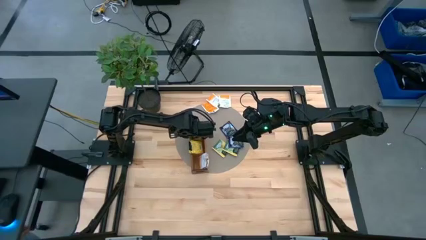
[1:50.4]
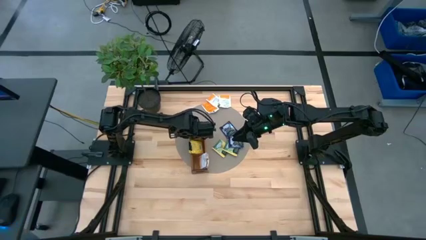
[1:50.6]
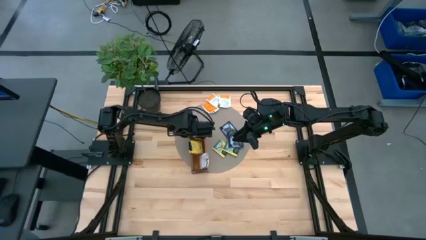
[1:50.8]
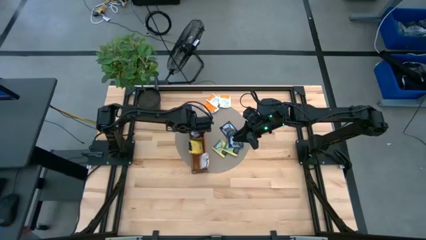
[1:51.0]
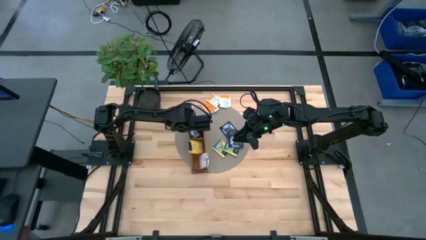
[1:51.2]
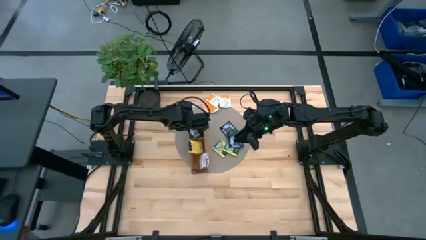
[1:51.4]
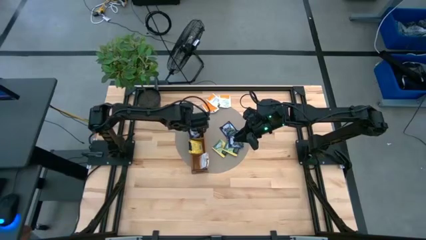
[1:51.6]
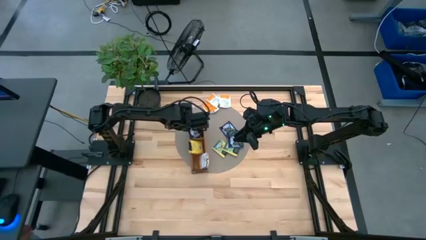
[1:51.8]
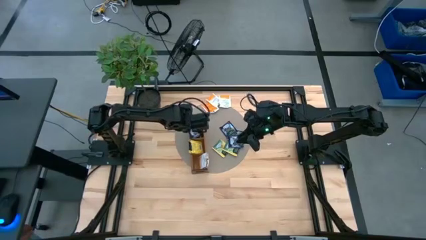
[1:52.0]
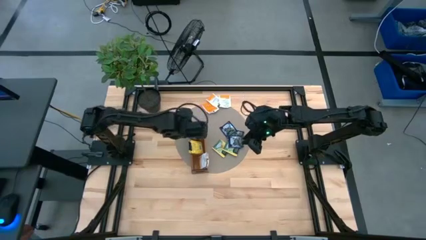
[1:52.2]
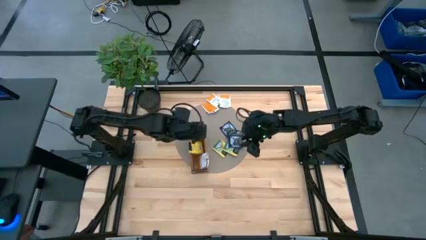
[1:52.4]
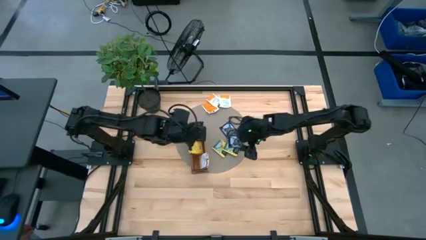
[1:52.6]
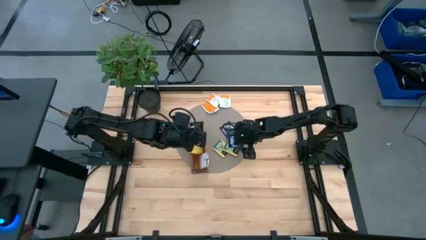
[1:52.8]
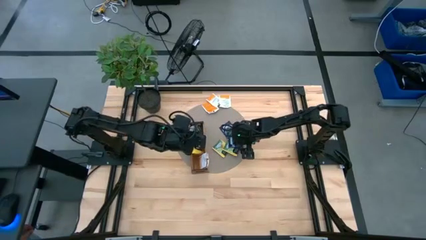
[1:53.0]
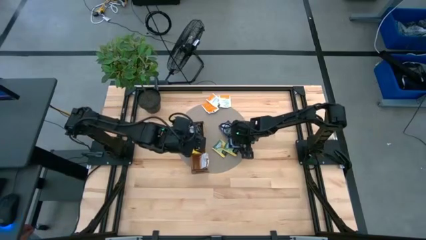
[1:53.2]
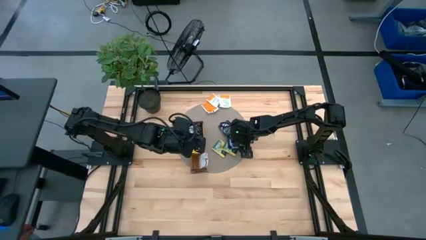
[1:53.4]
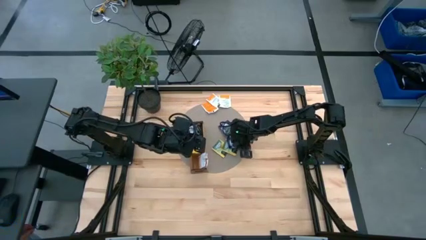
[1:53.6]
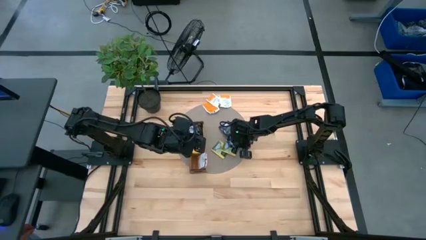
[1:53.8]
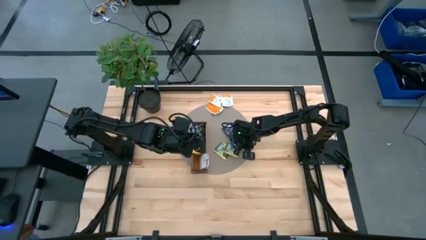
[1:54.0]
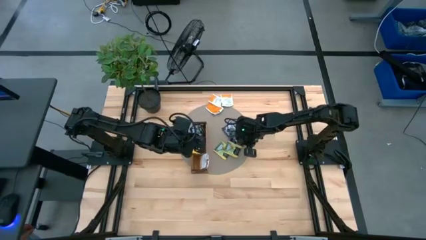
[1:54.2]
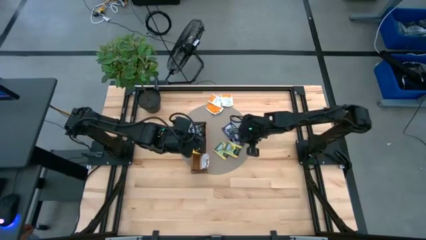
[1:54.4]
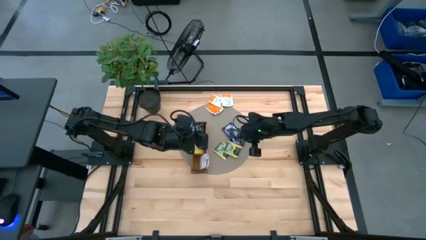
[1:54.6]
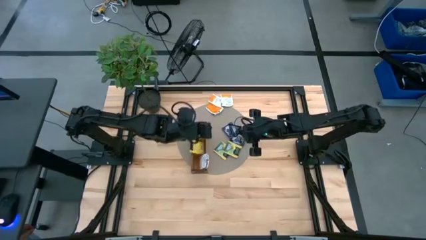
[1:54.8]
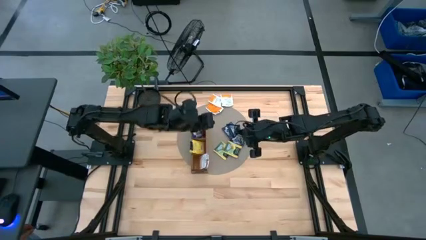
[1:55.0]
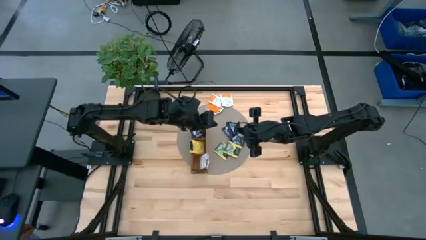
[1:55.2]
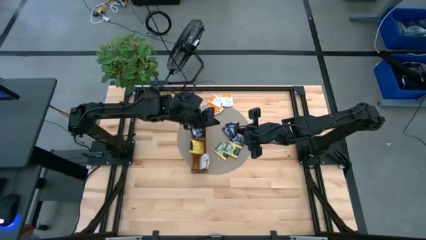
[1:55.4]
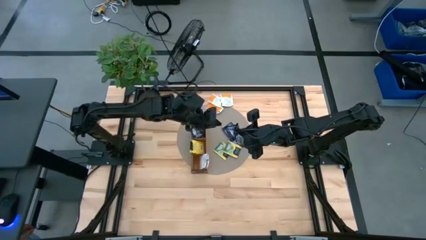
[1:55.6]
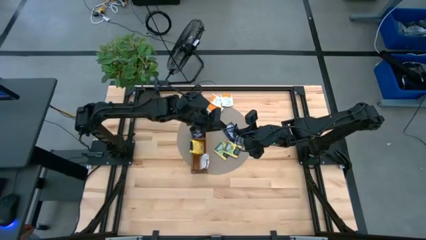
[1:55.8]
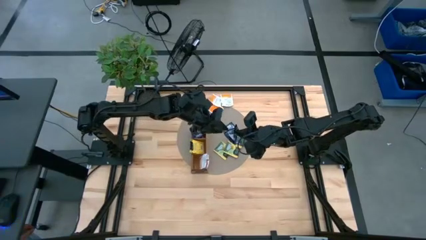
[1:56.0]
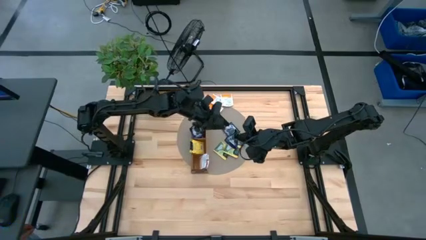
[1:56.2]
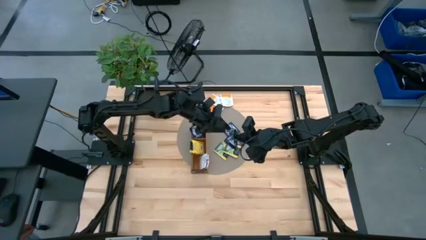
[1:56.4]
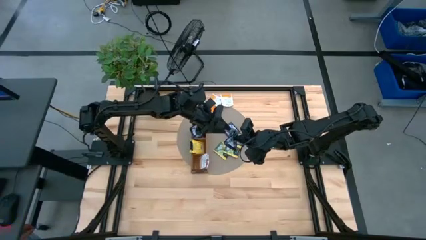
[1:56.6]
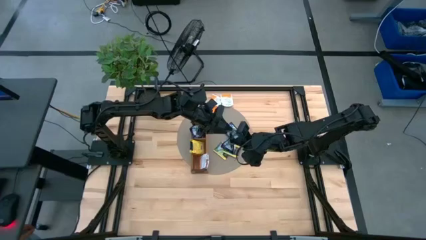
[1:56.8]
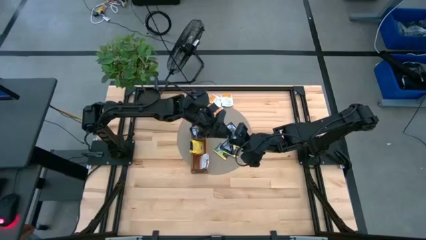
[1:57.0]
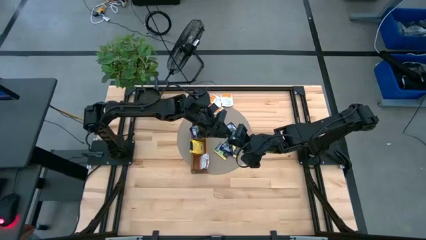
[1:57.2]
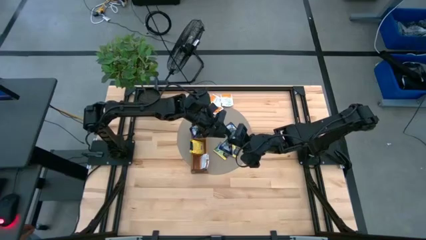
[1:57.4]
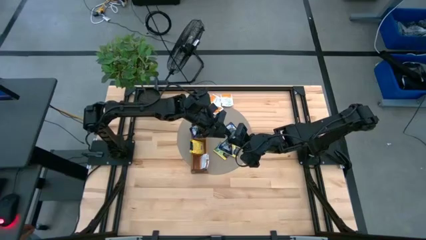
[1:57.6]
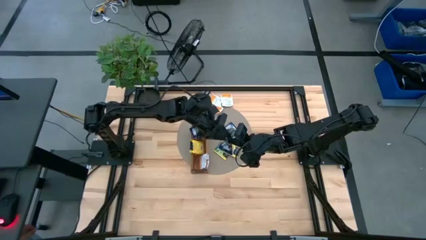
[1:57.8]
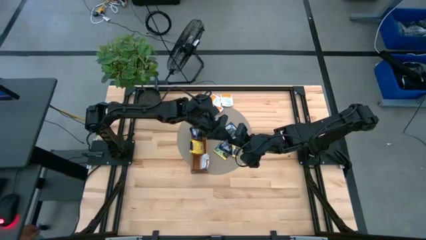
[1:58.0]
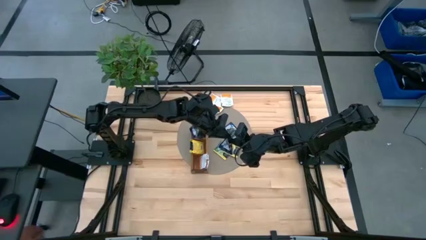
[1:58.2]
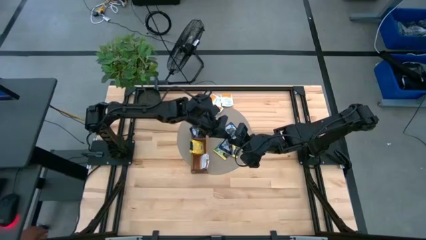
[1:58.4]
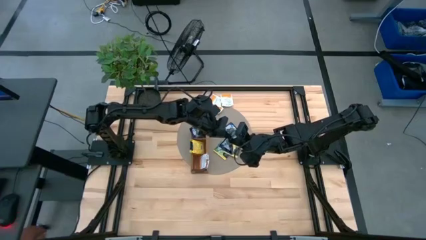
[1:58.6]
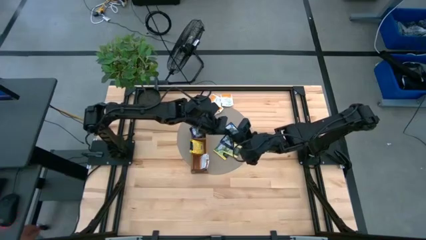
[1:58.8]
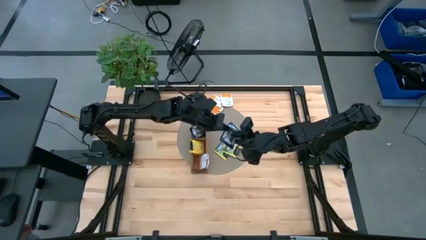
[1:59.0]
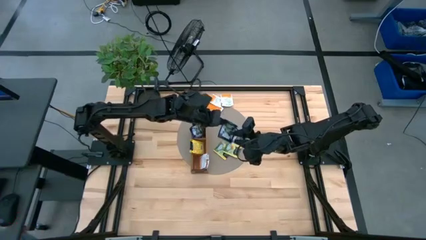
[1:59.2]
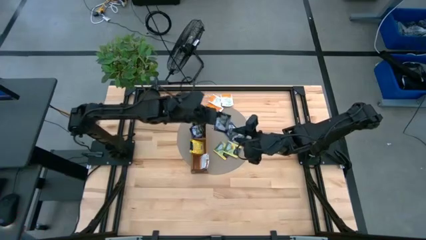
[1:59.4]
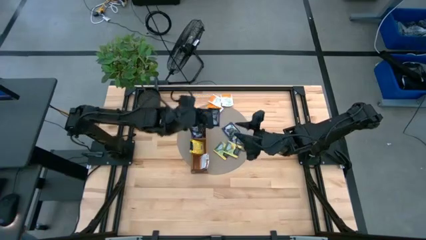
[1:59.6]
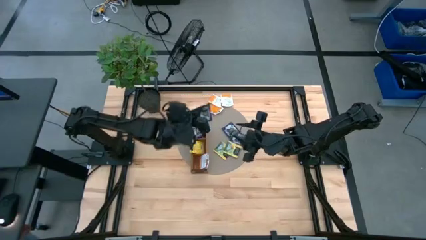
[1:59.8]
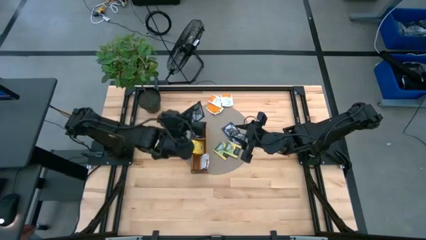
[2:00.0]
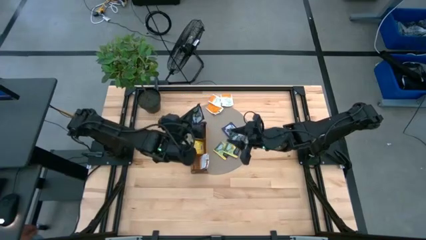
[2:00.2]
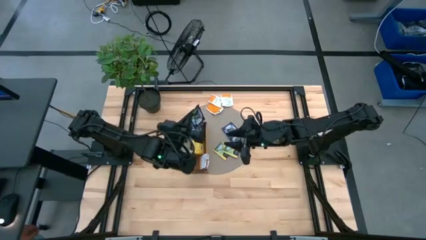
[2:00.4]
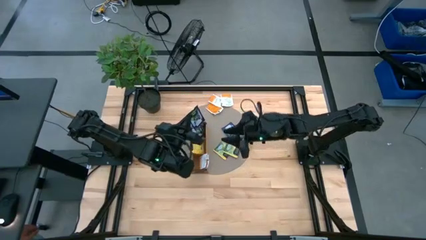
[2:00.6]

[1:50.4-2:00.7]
Task: Pick & Place Tea
Put the violet tea bag into the top section of the wooden organizer
